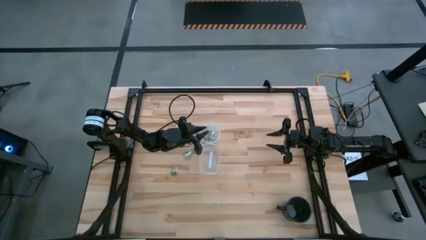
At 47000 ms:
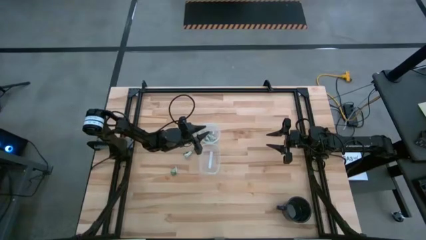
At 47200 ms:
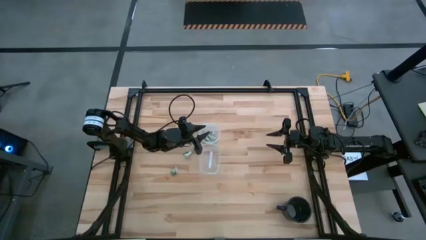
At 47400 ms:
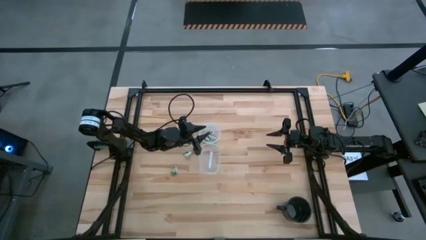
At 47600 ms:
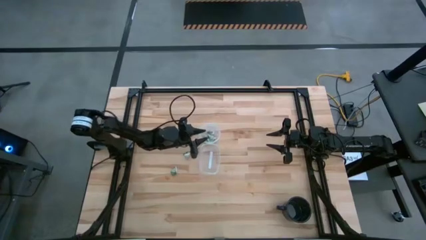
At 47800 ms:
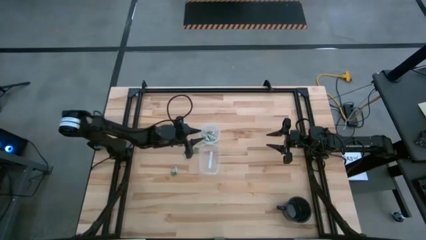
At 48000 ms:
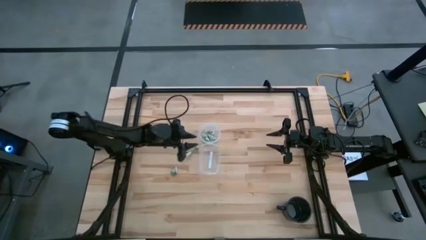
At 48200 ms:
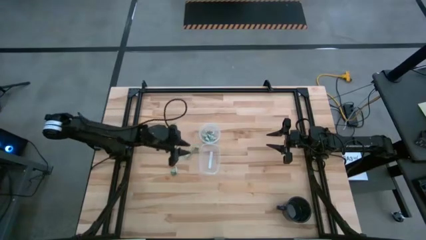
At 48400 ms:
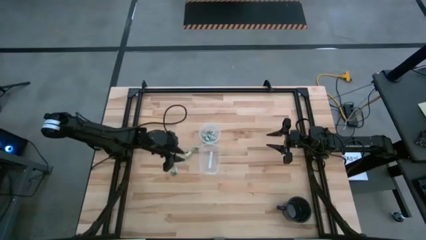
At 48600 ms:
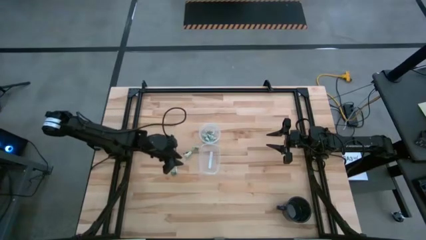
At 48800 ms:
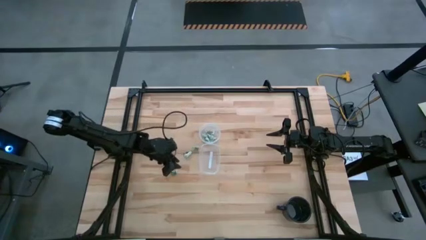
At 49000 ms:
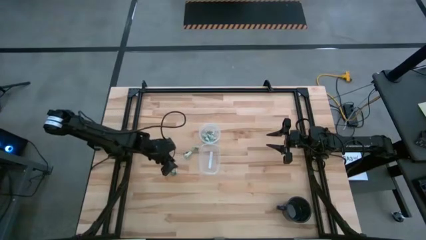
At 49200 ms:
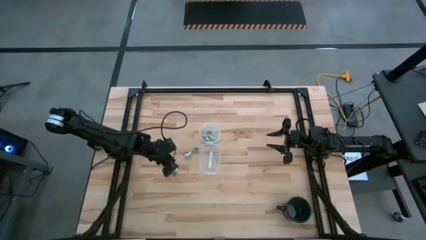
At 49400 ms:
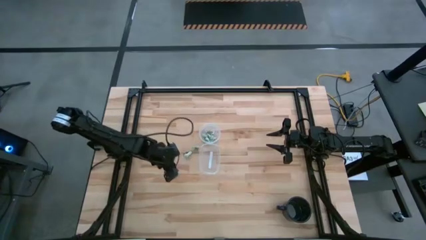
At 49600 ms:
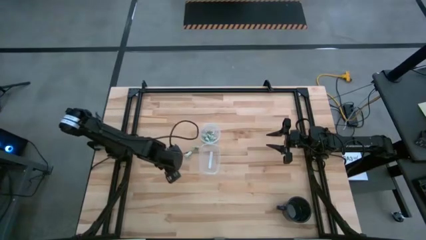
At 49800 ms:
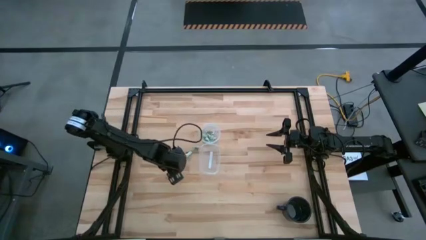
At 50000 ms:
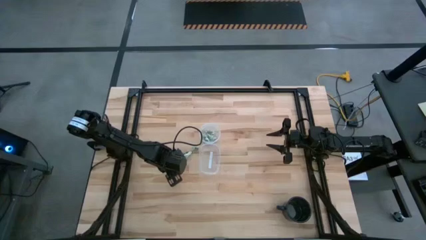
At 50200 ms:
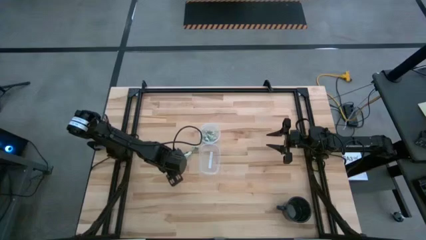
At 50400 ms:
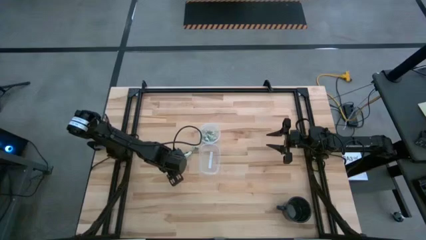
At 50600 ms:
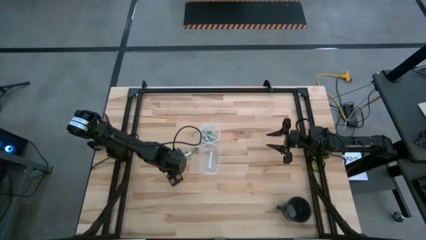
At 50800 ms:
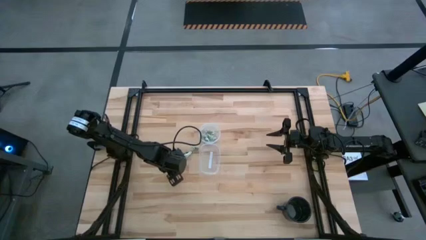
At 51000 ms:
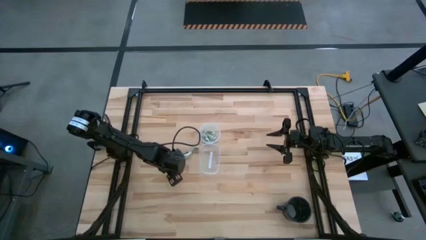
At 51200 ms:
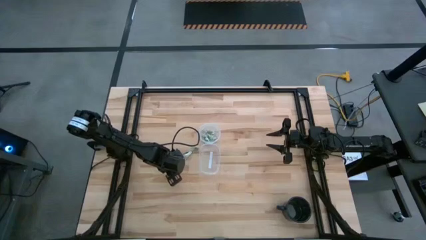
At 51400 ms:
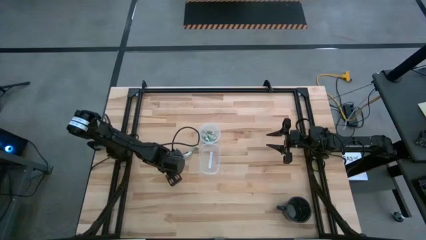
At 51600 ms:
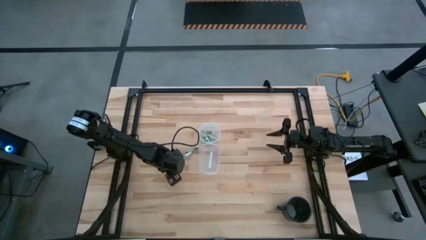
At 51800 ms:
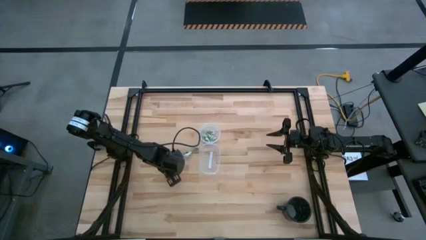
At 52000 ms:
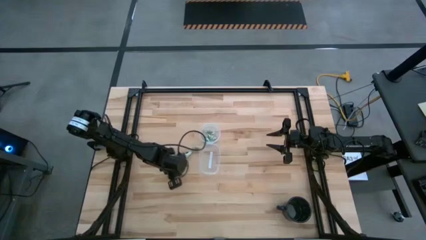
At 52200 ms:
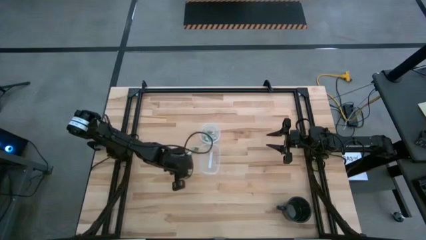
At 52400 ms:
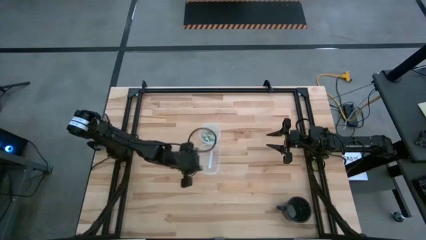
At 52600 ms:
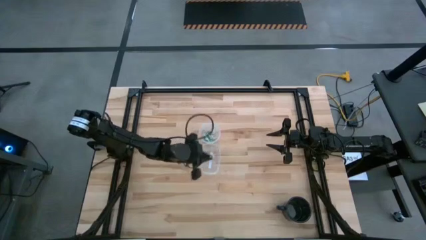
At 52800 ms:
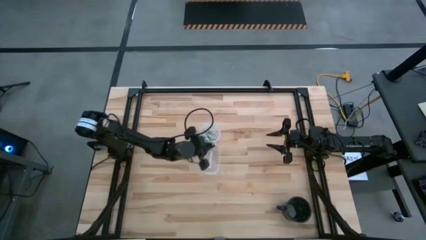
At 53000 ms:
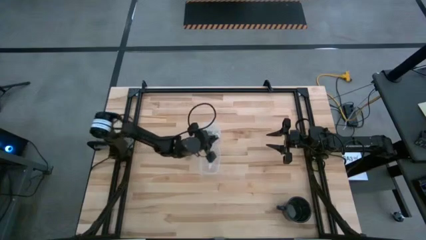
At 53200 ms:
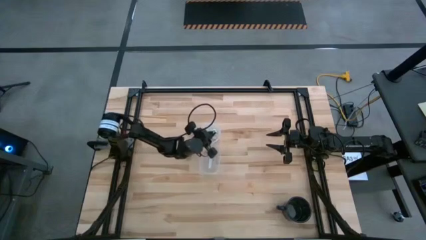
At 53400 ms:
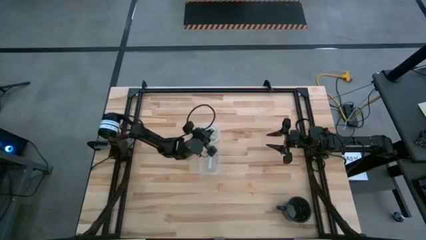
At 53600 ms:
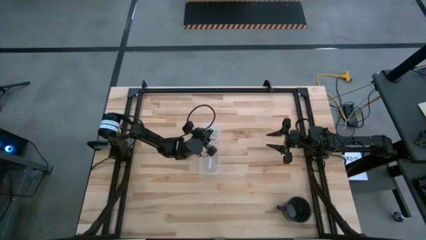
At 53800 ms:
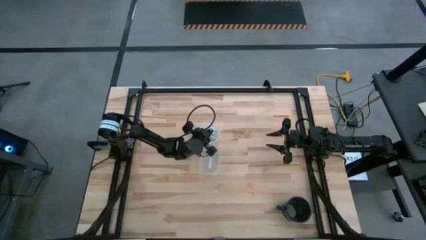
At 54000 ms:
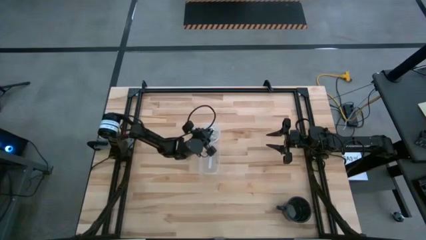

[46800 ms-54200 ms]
Task: Pick and place items into bin
Put the truvia packet into the circular transparent bin

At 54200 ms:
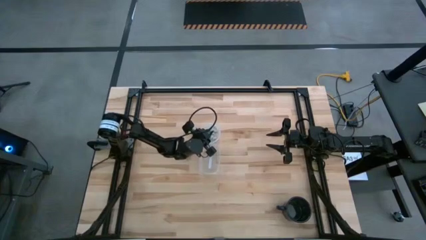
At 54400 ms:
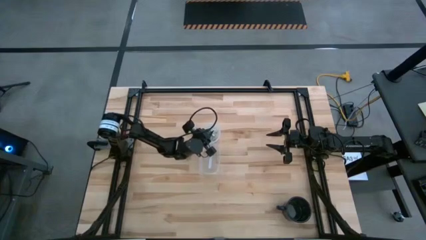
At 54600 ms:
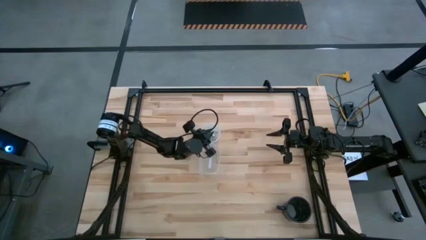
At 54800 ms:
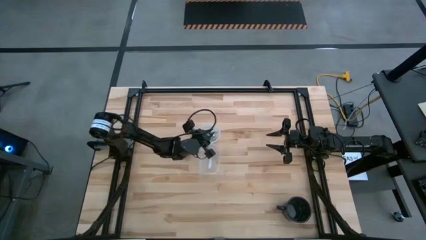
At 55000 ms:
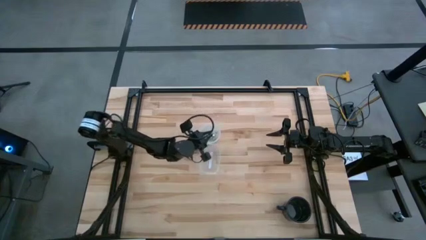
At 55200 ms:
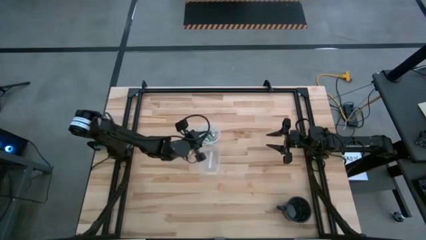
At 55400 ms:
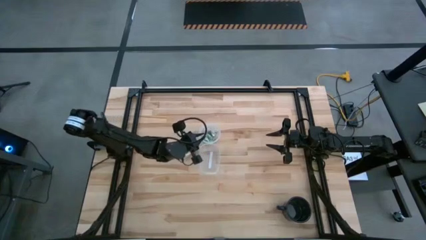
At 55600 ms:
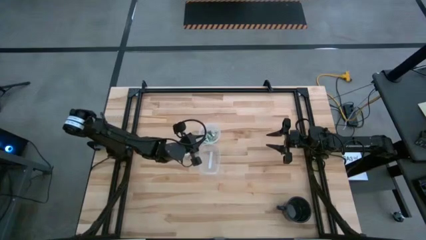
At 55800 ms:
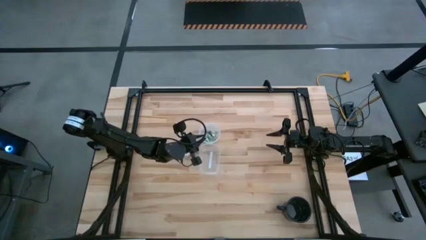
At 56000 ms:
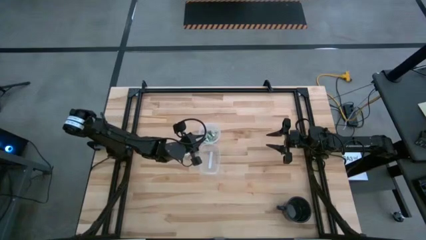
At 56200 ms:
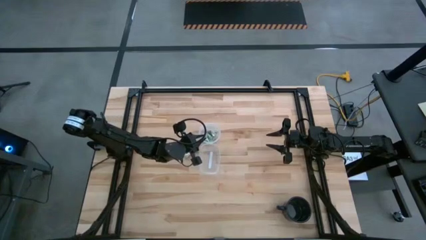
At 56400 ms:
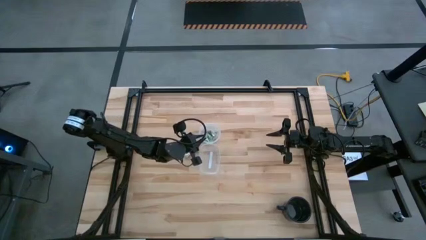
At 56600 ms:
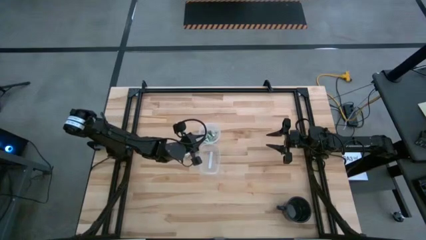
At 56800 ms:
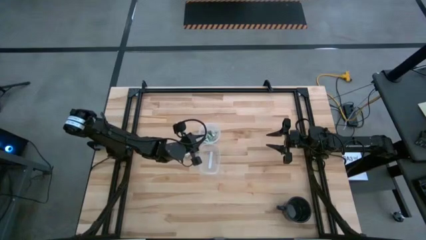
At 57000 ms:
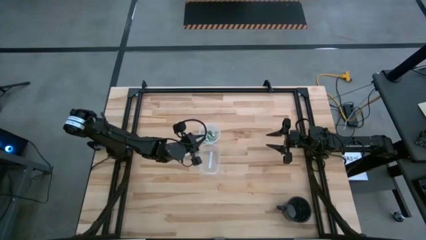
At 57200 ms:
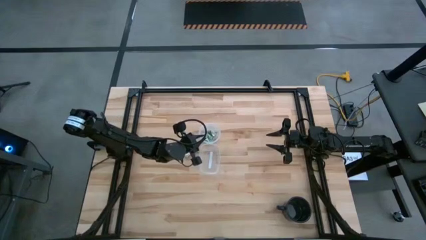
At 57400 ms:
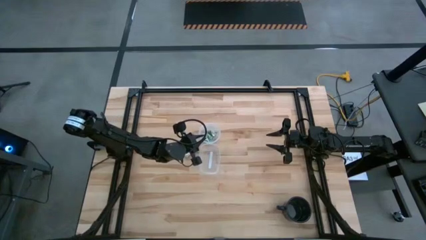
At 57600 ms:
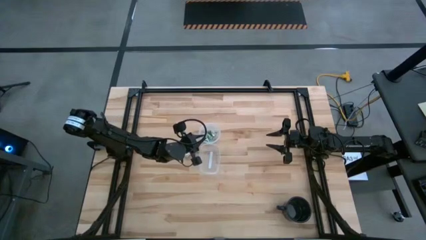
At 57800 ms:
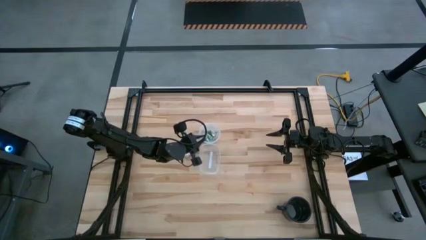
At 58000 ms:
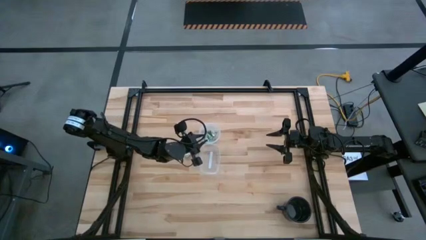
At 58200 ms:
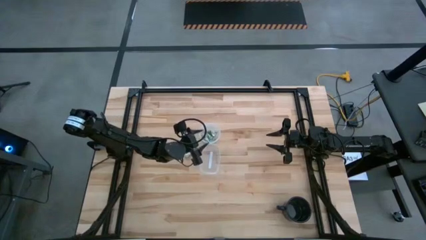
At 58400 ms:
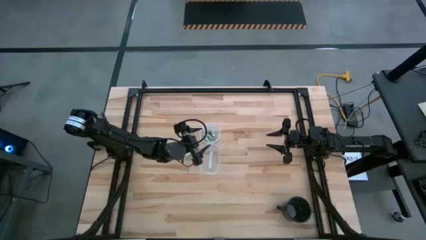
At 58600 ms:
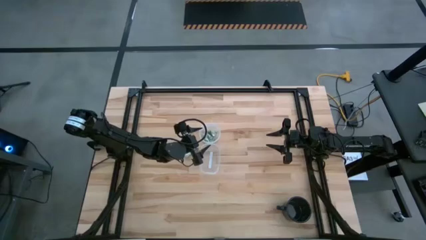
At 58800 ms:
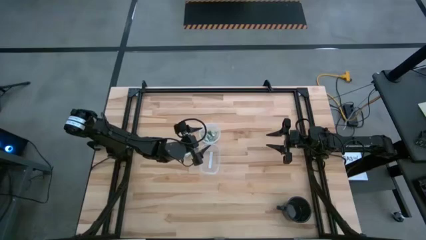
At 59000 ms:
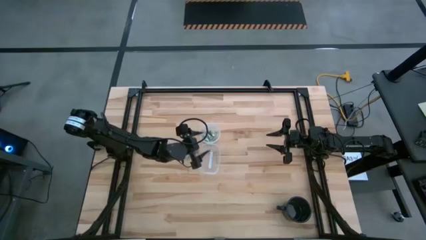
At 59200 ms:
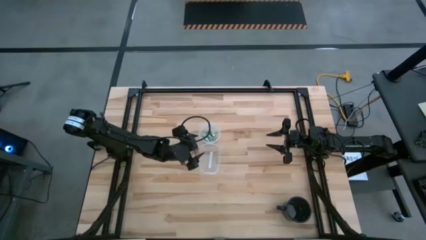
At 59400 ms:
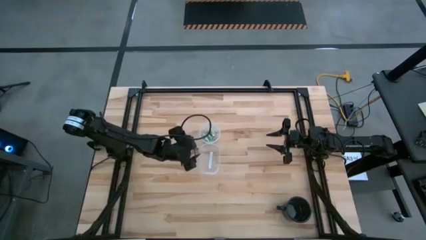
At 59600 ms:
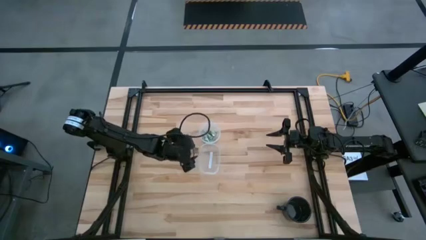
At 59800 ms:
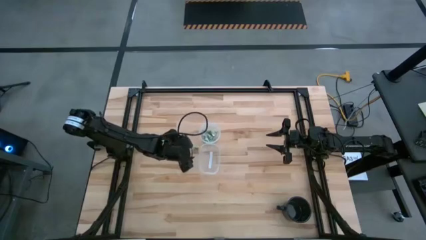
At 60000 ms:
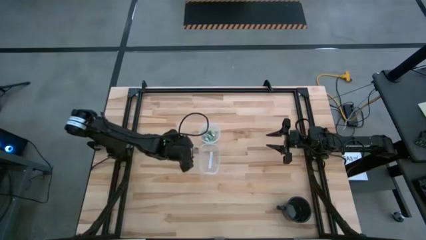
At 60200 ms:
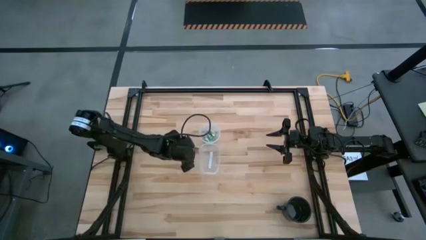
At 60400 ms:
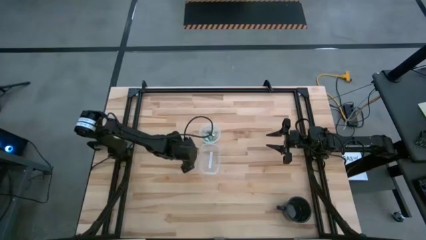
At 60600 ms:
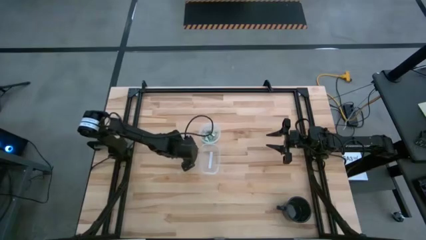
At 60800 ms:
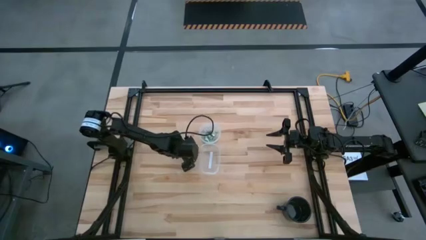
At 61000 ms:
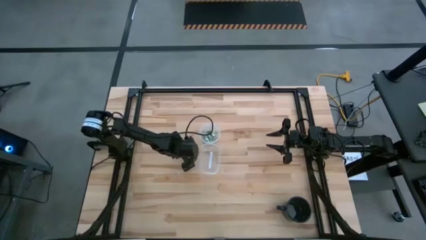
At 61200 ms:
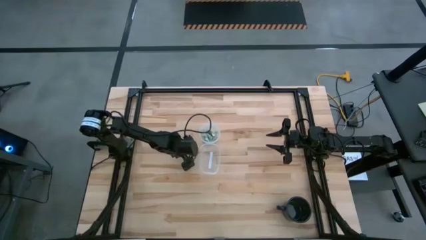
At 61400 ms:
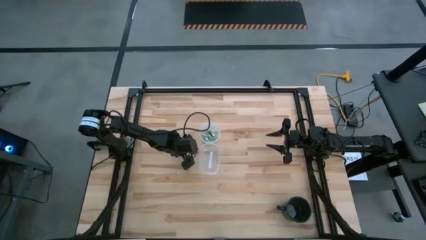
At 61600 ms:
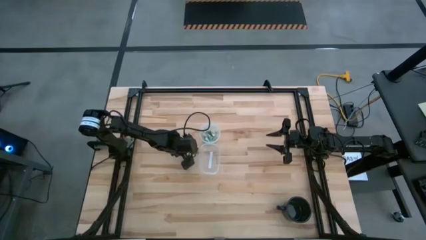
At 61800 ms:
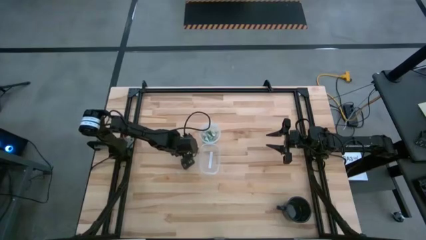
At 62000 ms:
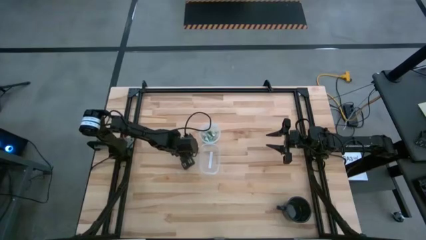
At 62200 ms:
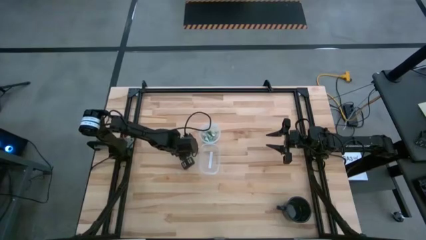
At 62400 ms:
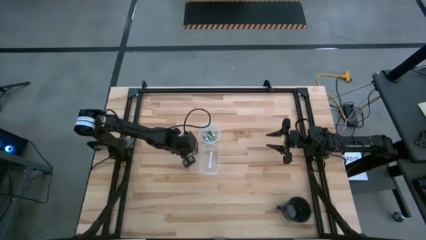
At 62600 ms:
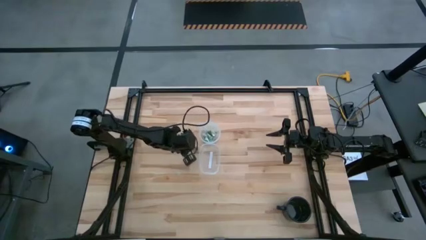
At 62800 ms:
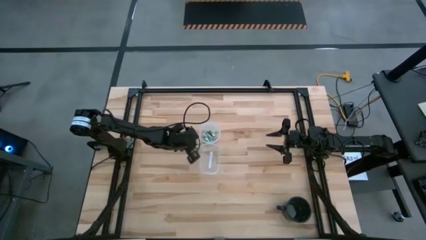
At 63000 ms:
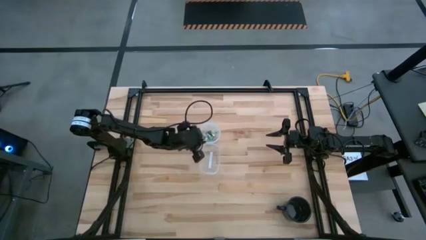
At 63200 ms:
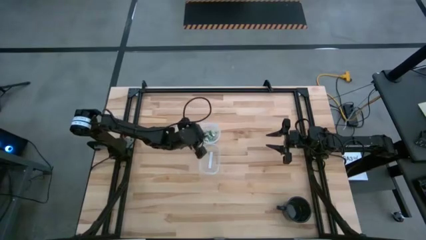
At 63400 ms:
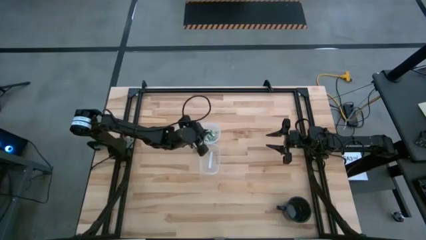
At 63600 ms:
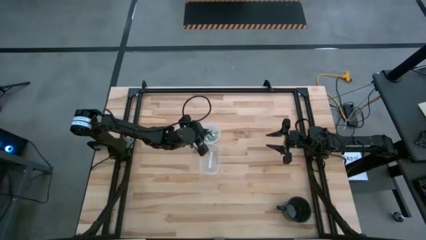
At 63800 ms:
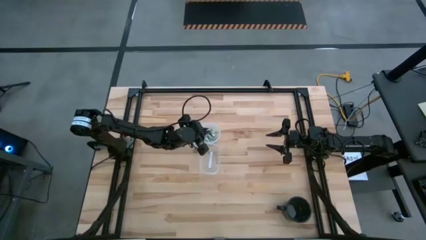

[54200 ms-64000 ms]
Put the truvia packet into the circular transparent bin
